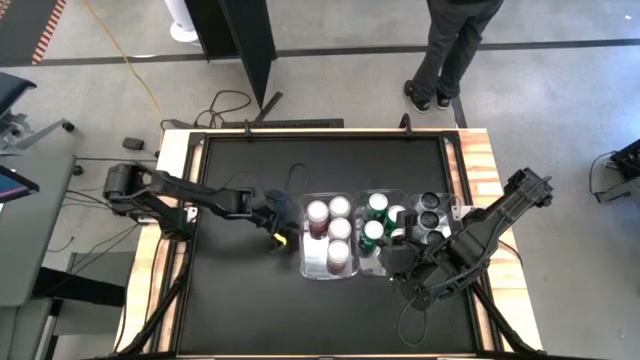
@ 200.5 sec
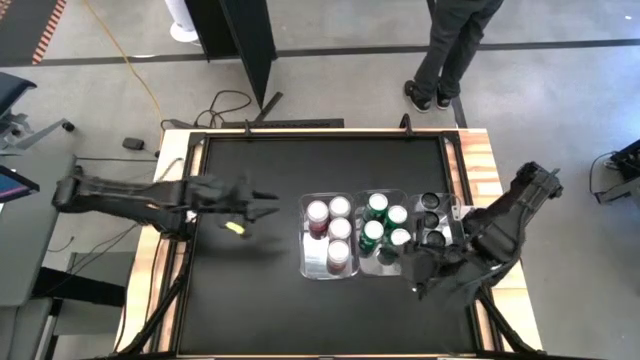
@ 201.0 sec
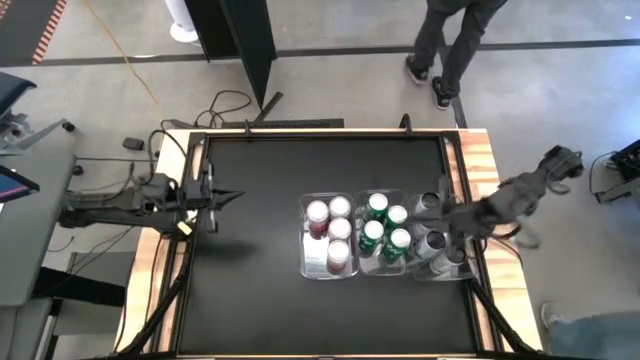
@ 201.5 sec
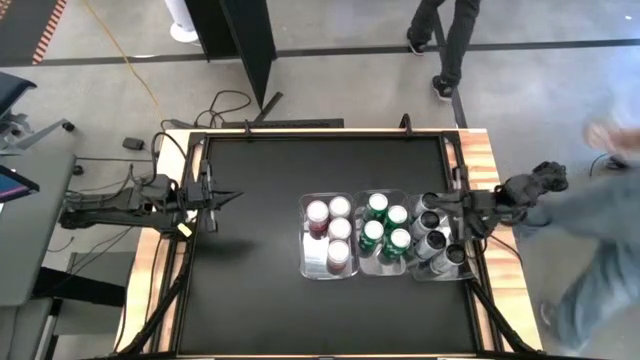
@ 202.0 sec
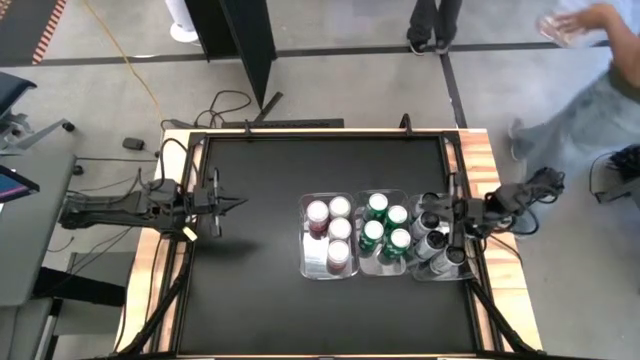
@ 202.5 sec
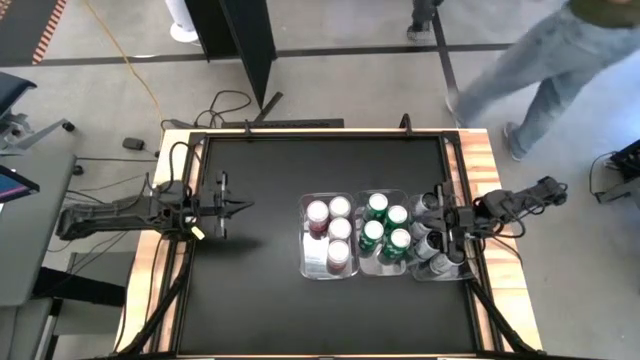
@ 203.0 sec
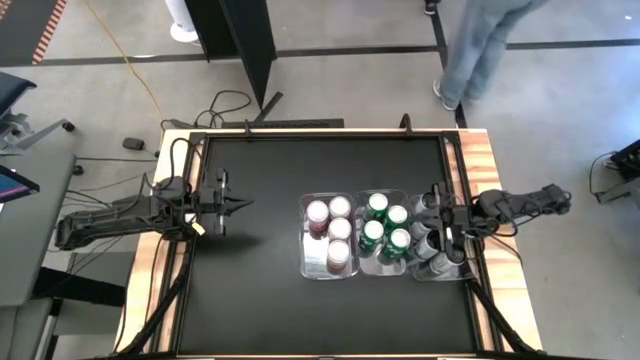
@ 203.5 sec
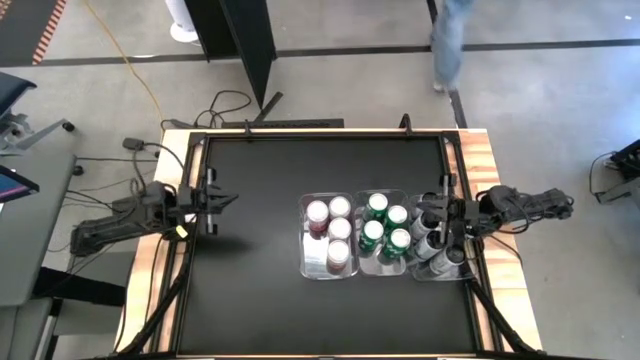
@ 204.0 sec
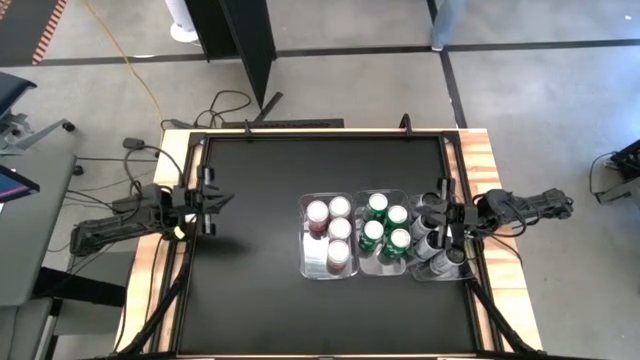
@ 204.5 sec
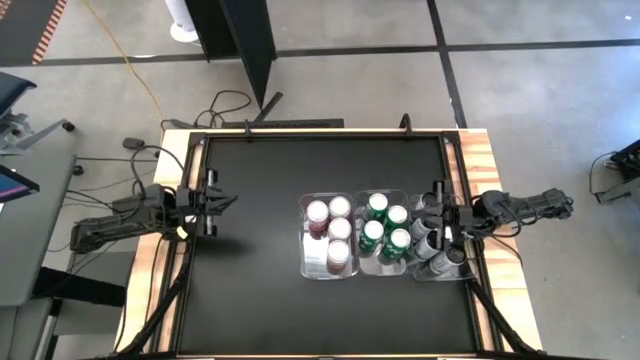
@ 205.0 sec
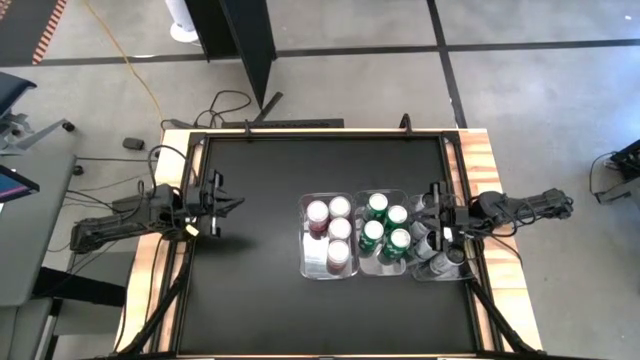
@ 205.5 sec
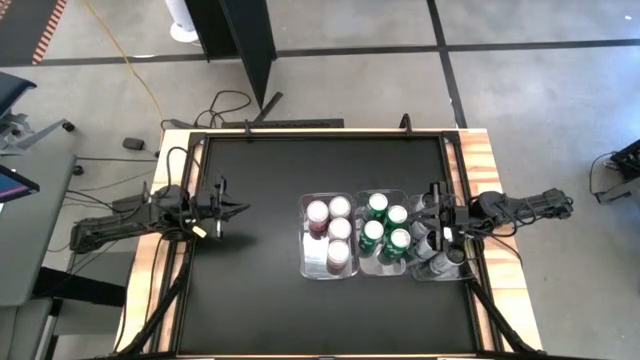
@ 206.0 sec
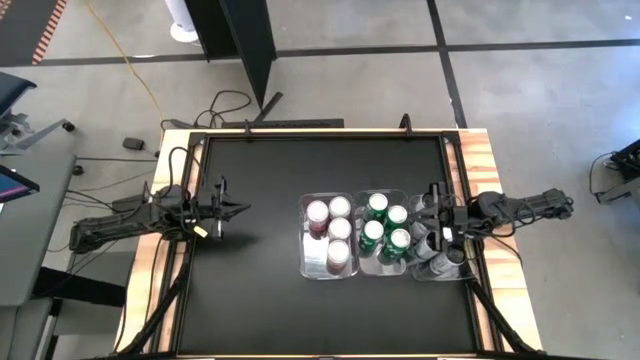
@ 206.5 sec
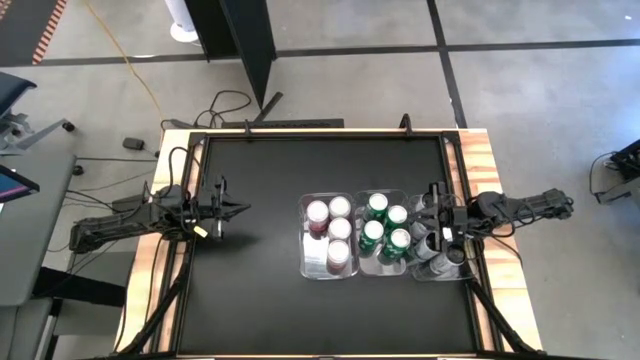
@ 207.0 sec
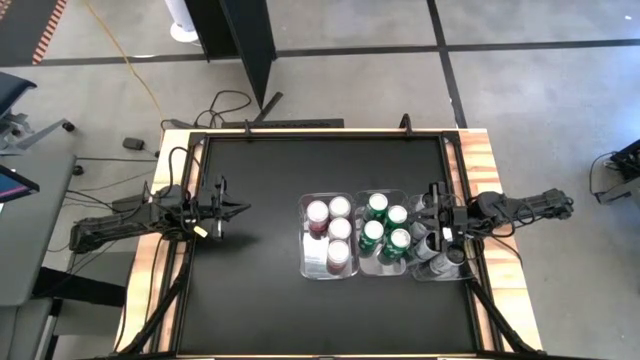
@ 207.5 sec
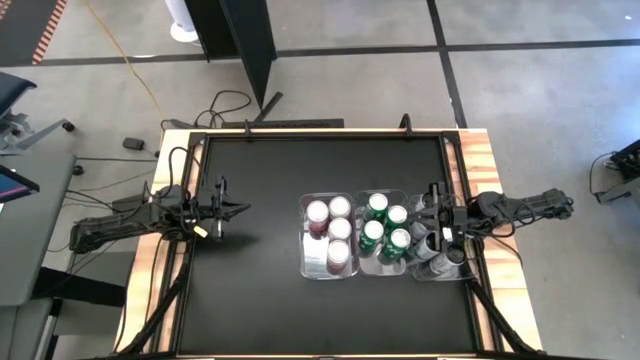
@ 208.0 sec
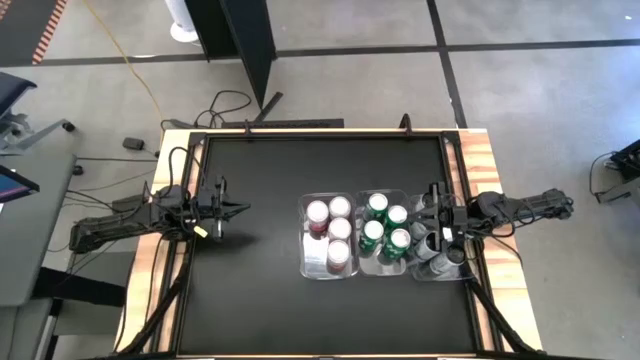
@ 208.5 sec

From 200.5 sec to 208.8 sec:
Task: Sort soda cans
Return to Home Position

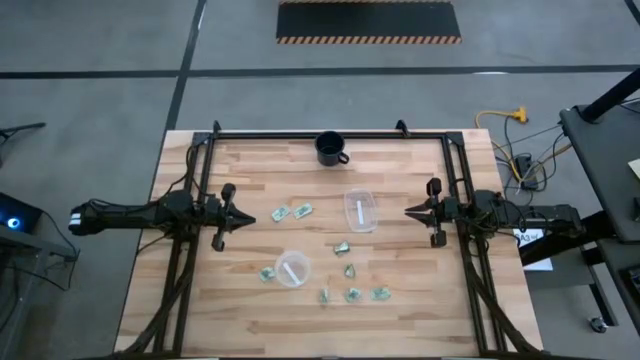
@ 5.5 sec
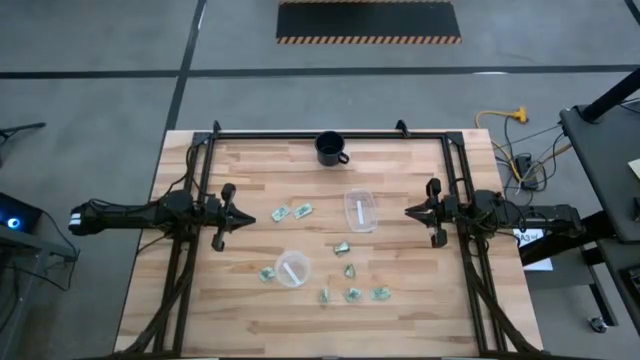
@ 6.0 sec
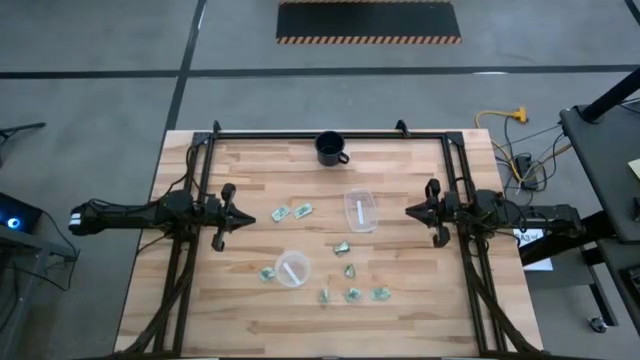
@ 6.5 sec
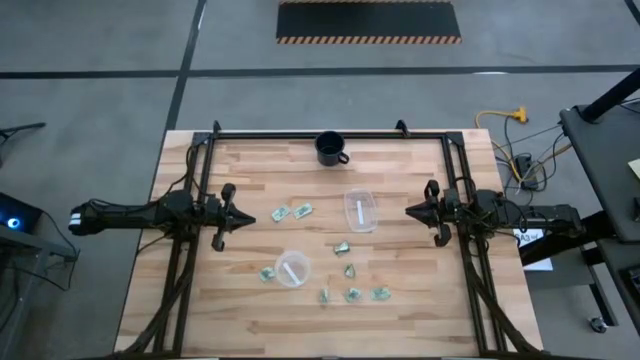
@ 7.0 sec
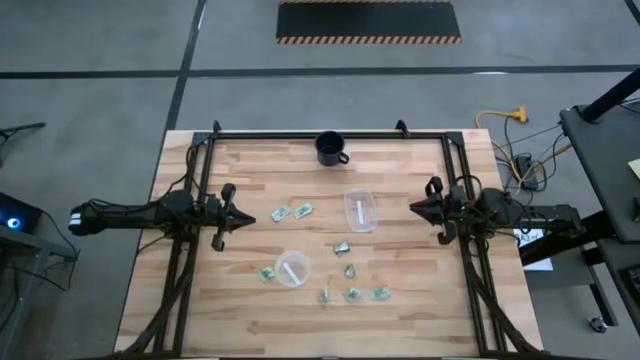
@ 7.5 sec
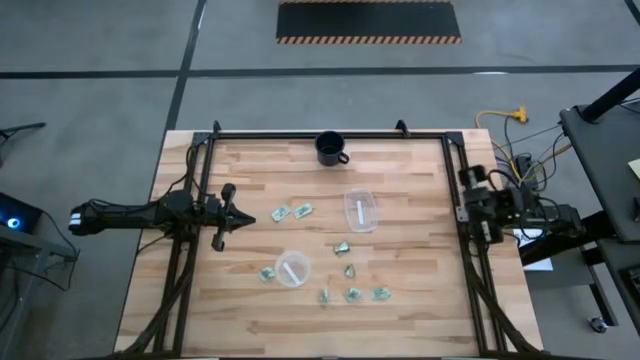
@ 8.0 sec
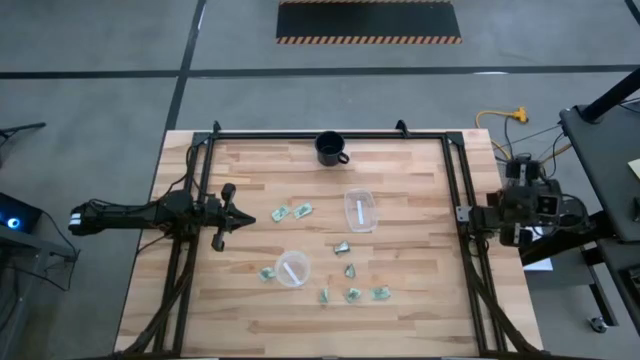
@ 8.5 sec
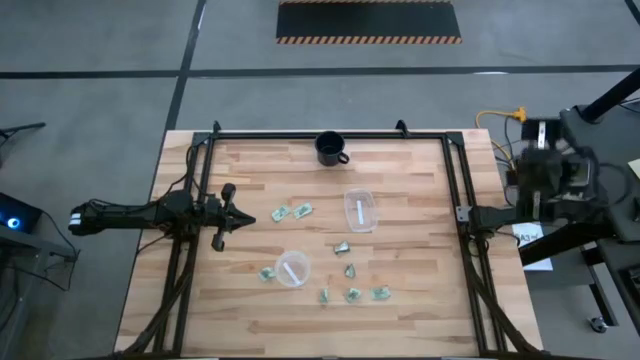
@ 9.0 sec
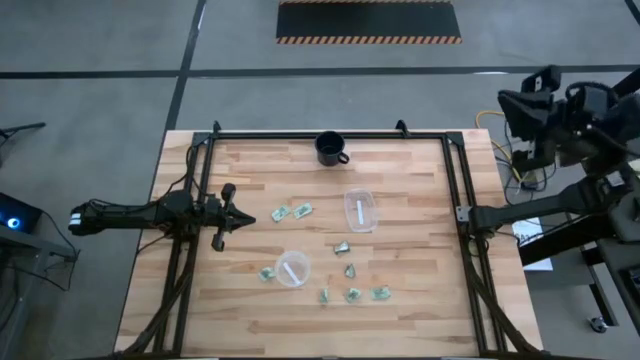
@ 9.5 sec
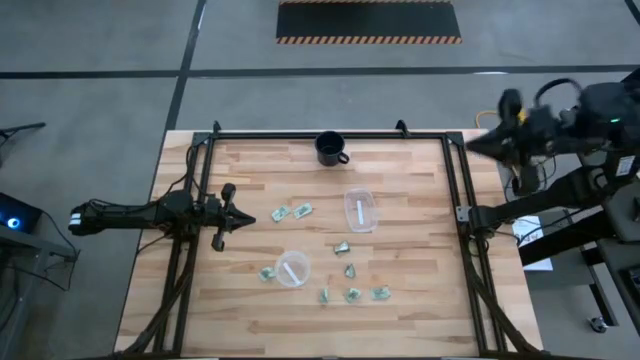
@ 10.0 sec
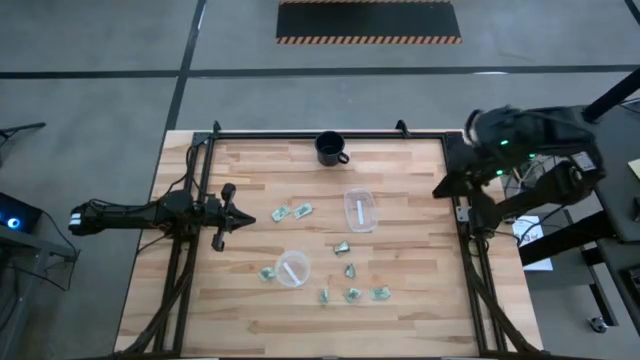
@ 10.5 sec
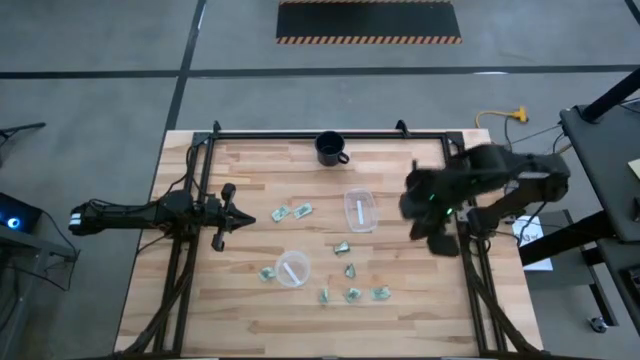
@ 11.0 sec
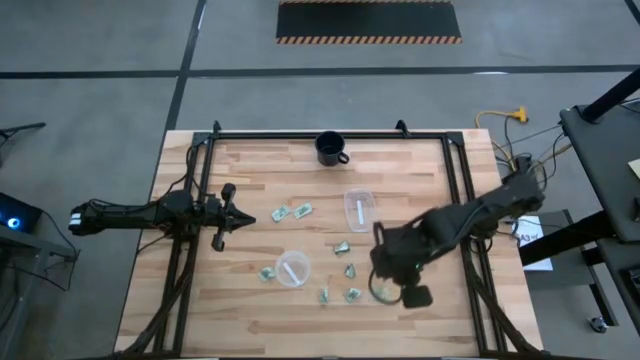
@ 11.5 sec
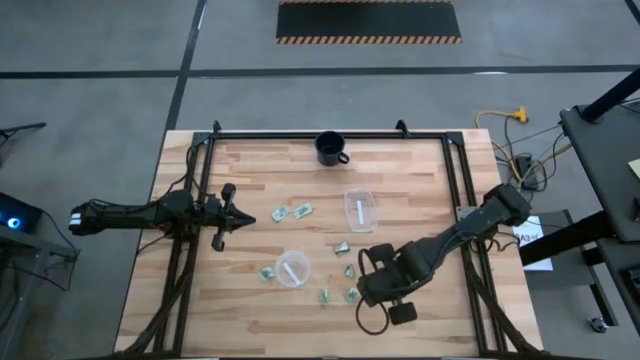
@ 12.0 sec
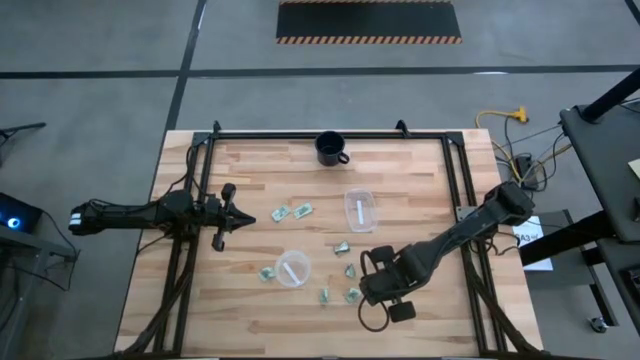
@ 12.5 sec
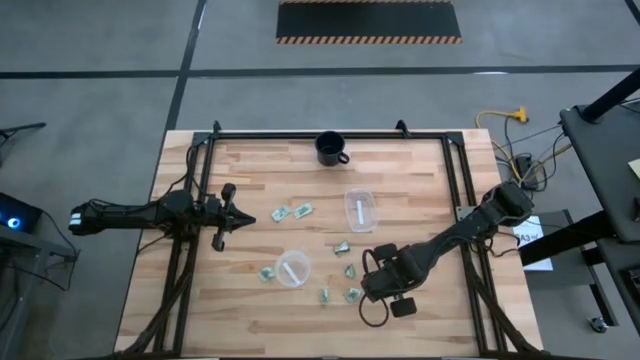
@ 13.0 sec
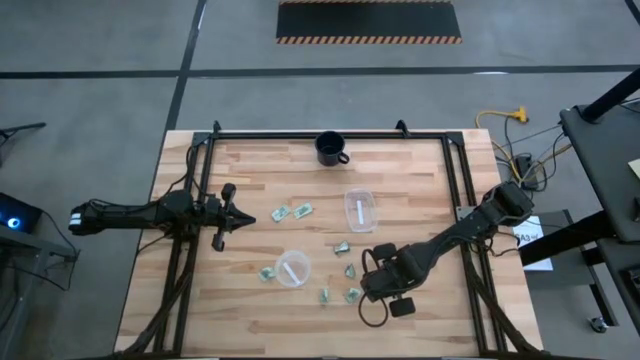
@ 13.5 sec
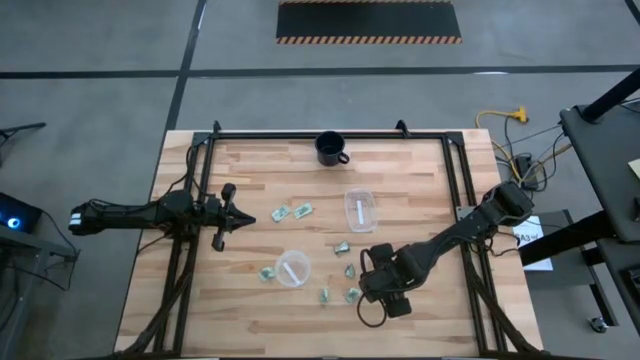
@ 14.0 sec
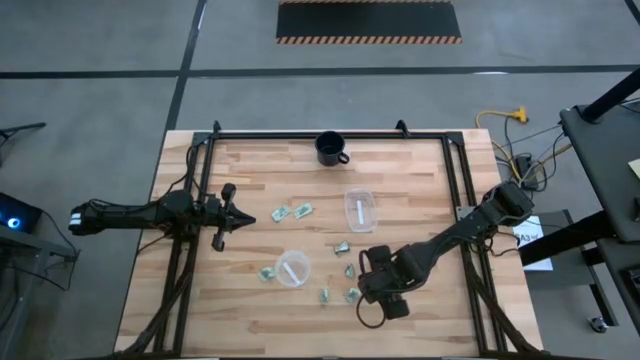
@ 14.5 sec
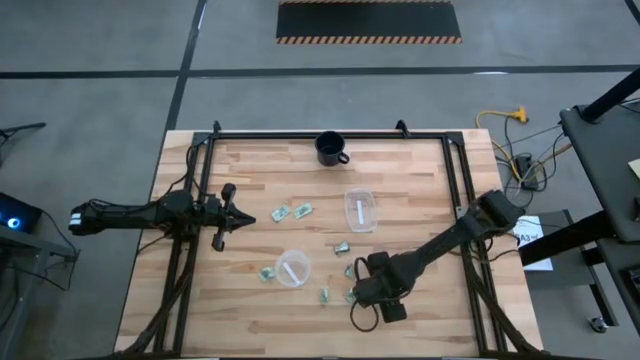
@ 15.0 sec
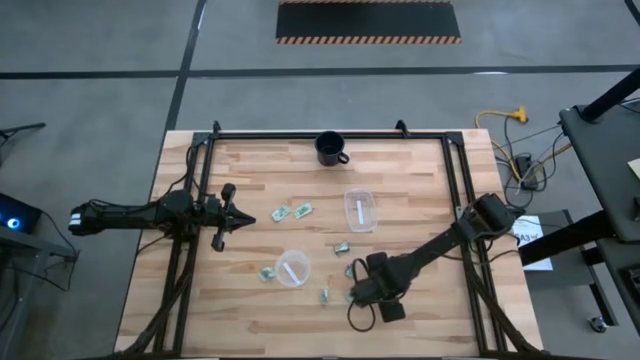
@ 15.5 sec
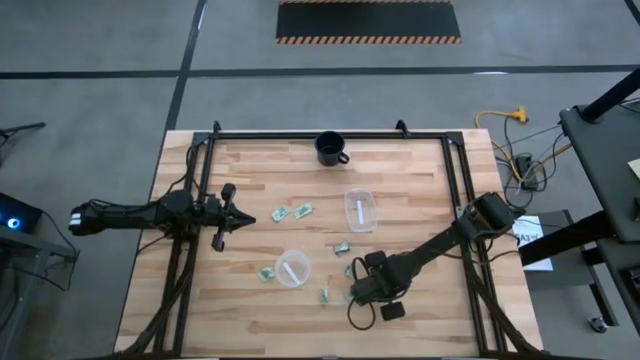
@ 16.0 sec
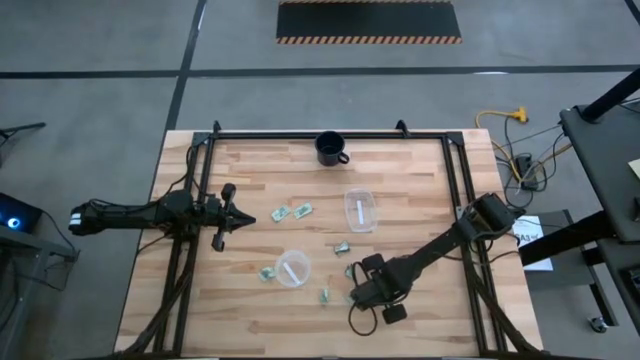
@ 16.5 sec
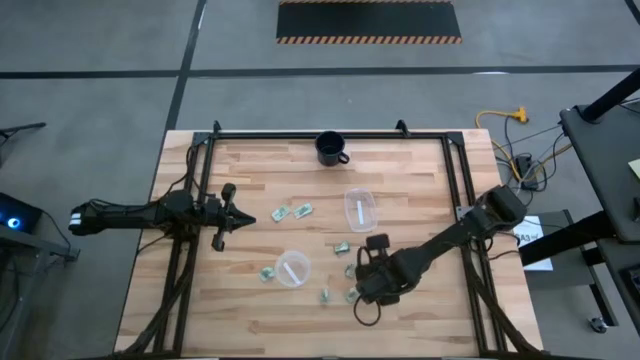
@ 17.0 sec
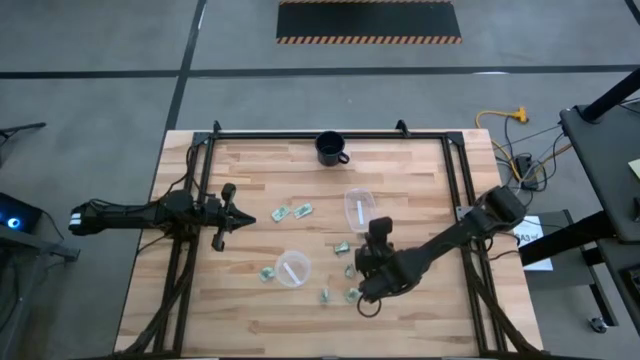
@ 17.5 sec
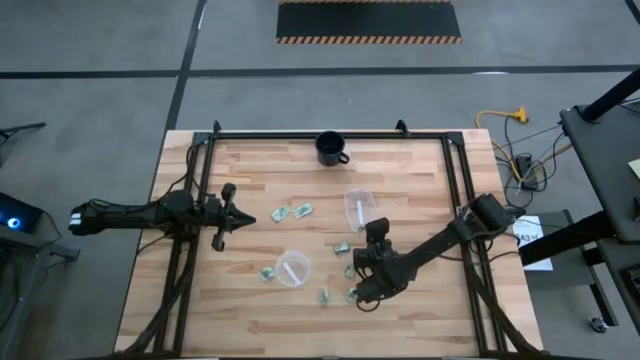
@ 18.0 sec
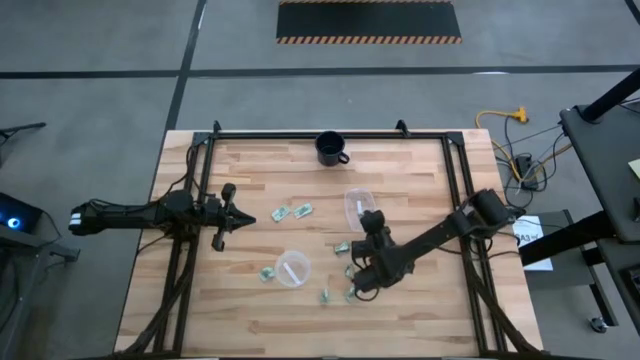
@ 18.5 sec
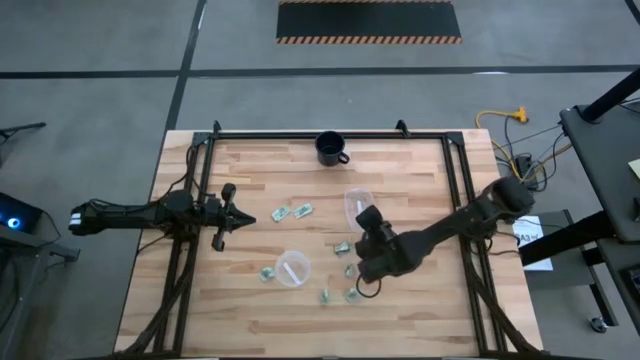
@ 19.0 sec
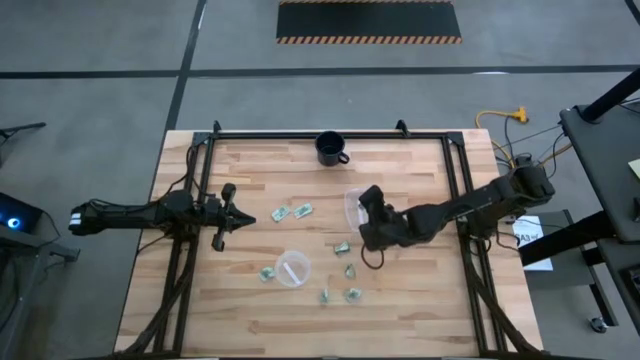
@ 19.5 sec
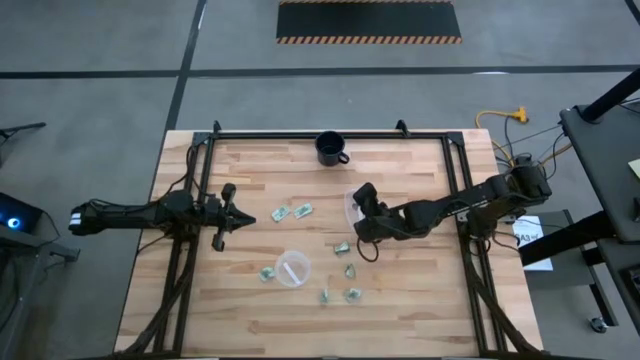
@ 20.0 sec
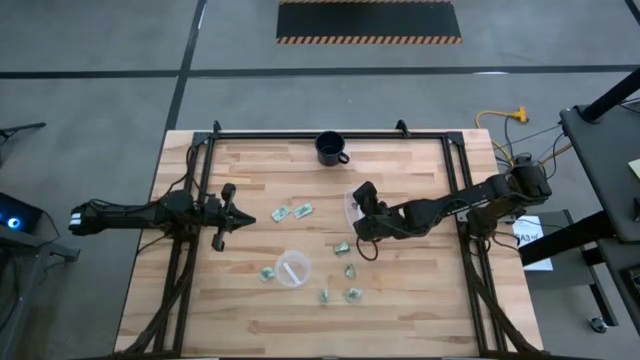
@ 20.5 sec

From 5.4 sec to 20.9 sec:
Task: Pick and place items into bin
Put the white stevia packet into the right transparent bin
